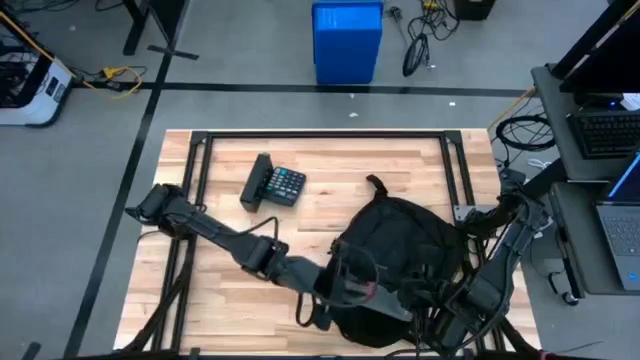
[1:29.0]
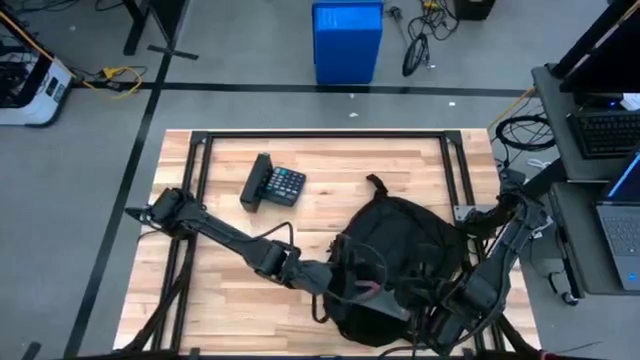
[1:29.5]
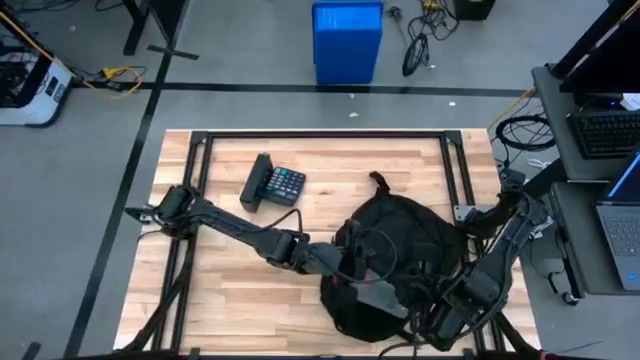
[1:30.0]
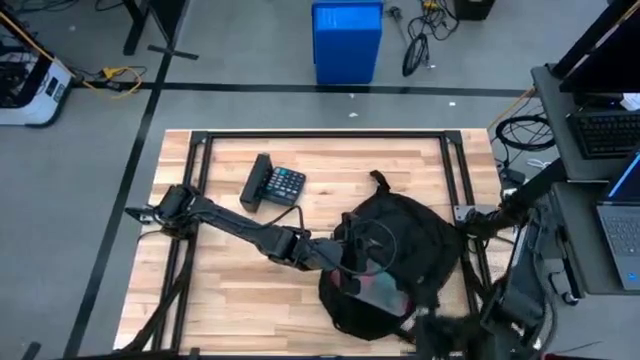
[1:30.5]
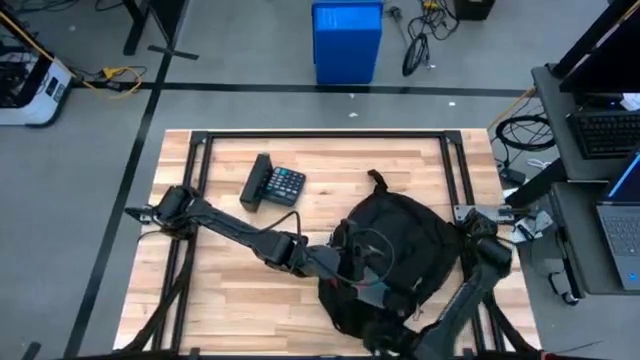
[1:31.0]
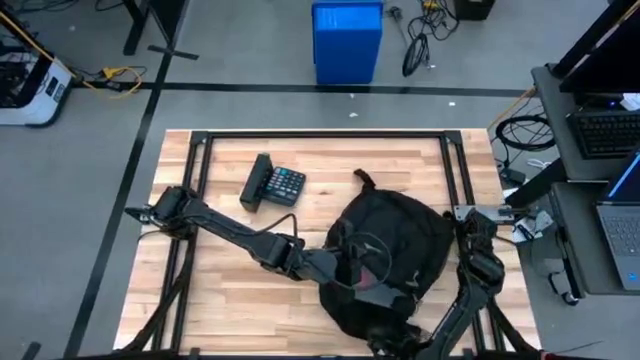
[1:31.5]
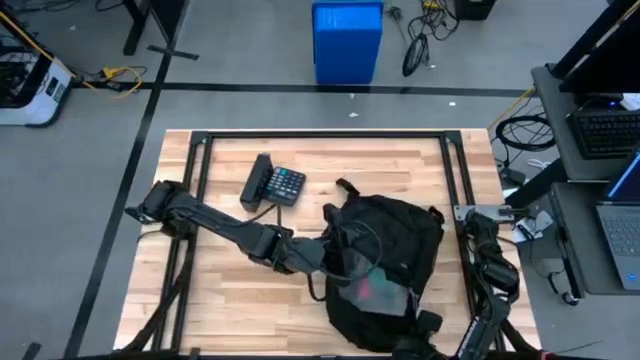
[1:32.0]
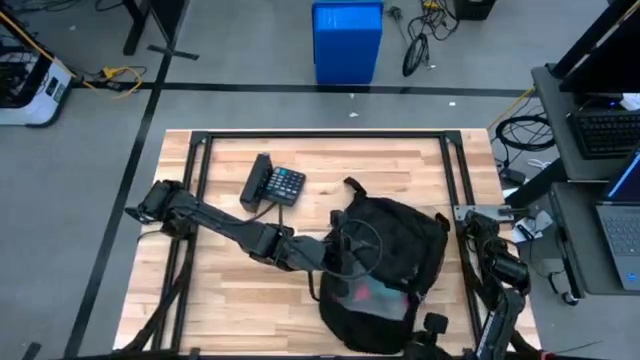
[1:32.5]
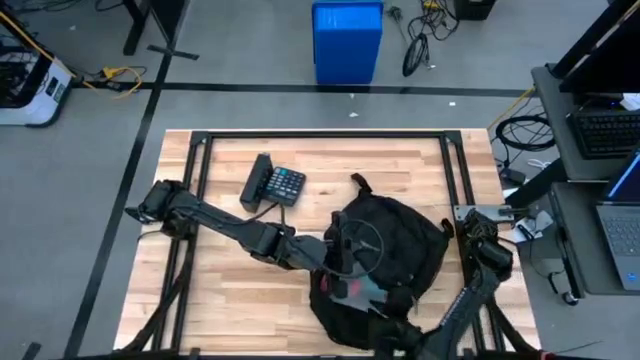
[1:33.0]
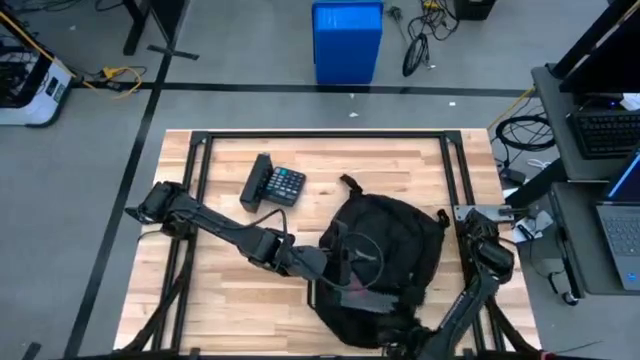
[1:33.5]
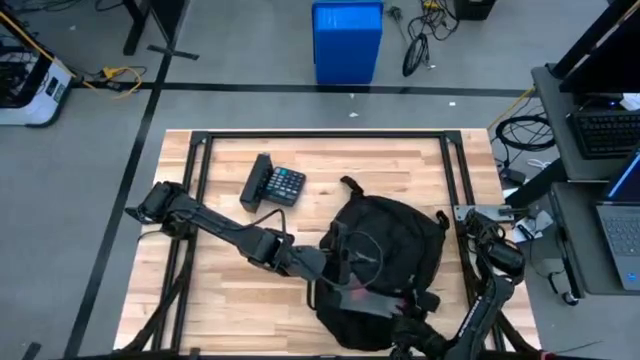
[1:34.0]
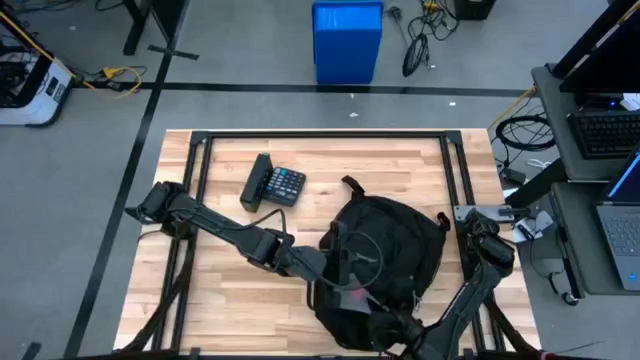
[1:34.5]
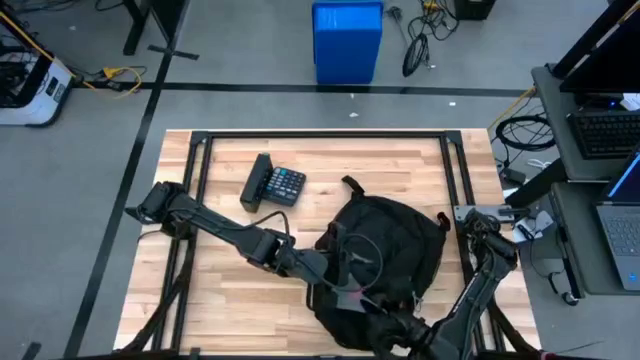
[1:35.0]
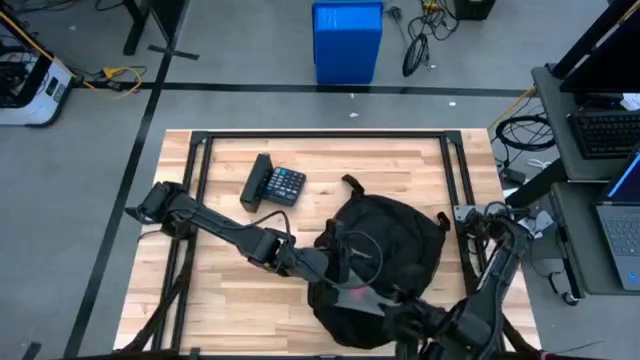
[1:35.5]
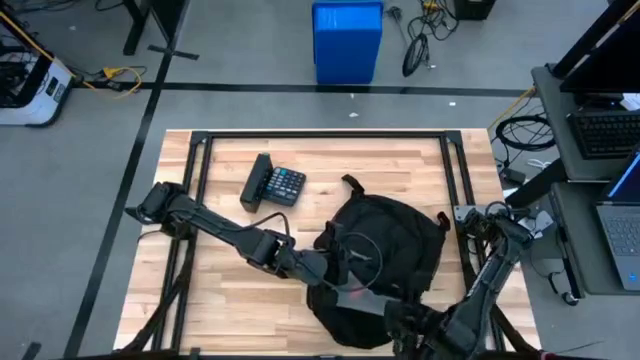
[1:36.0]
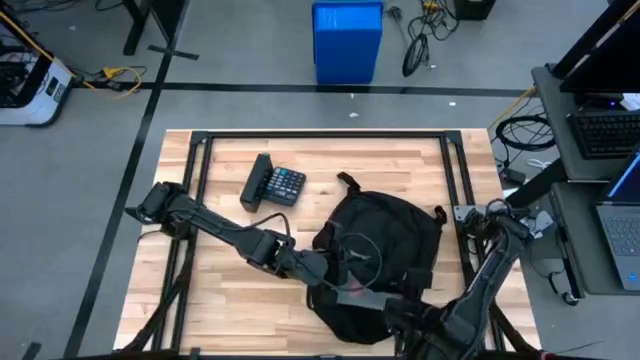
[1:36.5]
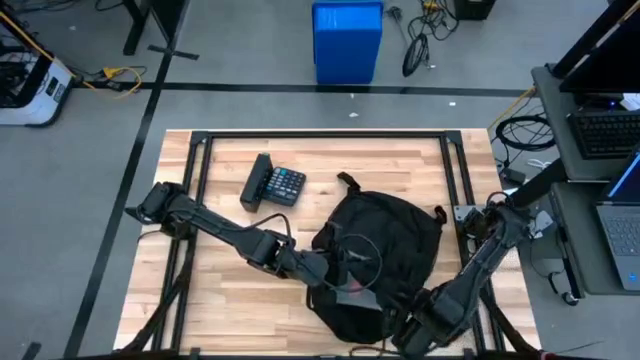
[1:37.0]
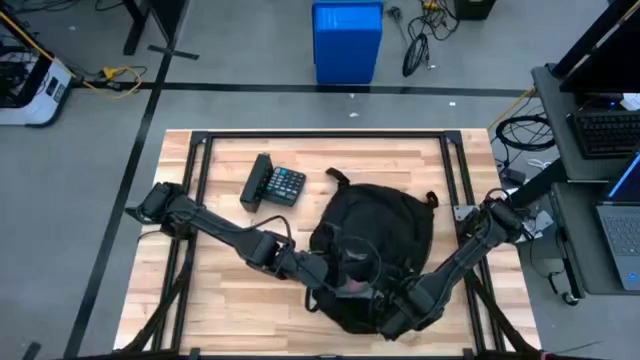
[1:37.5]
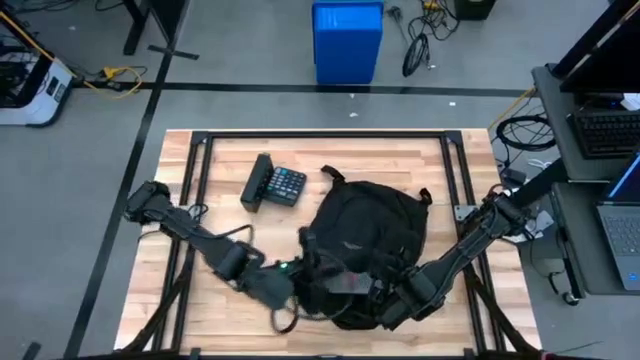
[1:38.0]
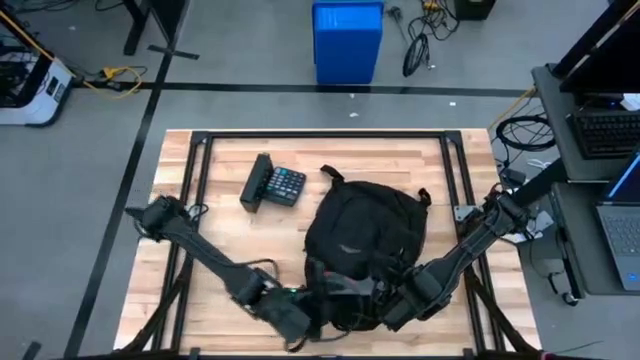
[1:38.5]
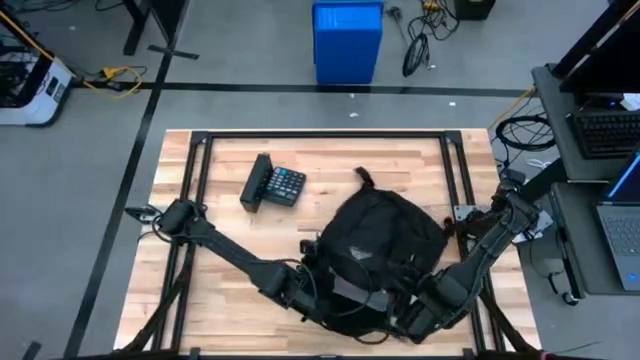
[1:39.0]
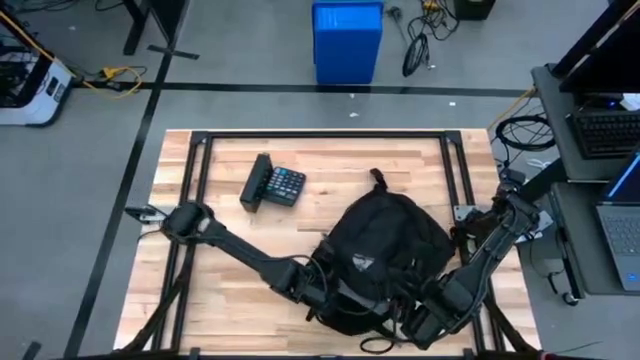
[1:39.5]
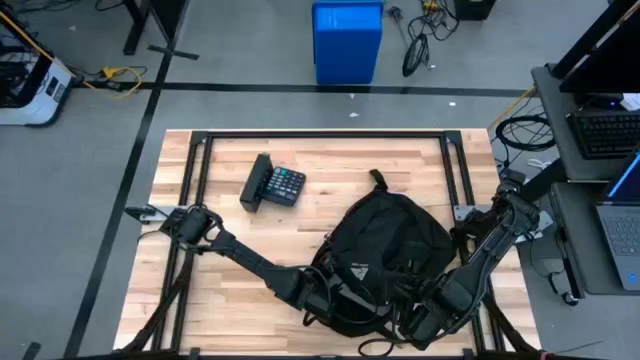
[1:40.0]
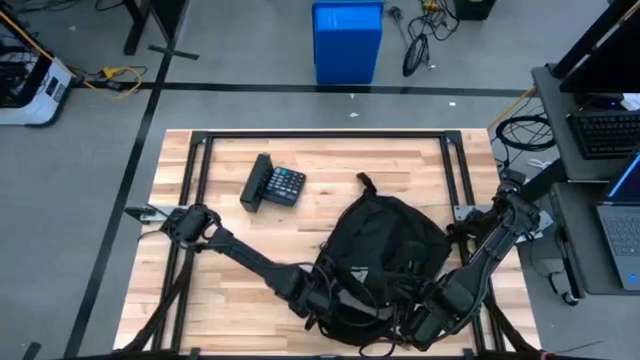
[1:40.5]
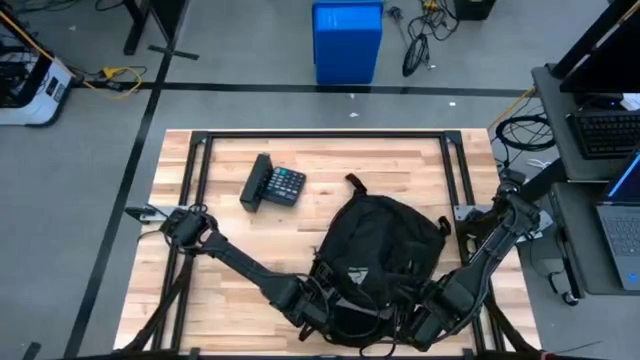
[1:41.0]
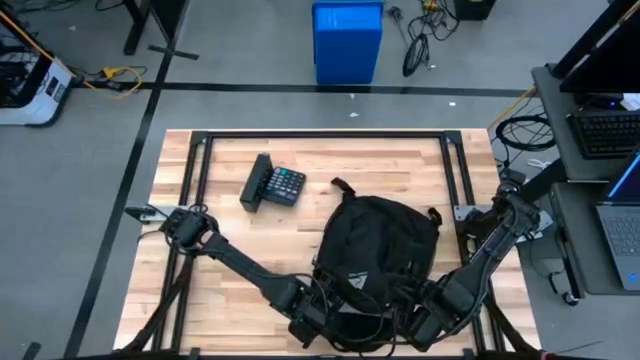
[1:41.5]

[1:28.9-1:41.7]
Task: Unpack backpack
Remove the white zip bag from the black backpack

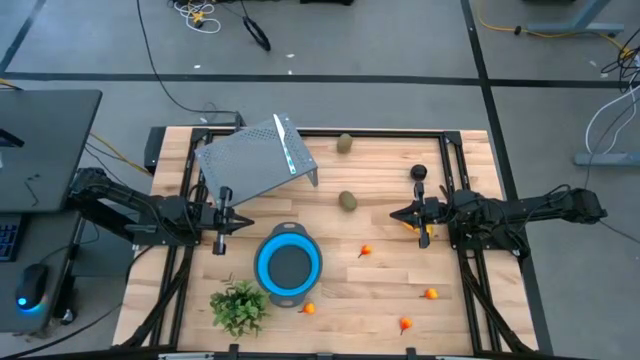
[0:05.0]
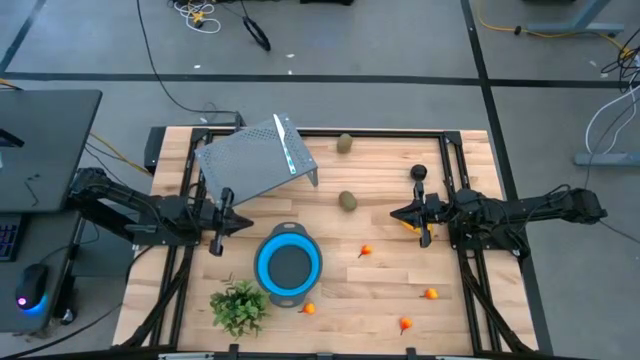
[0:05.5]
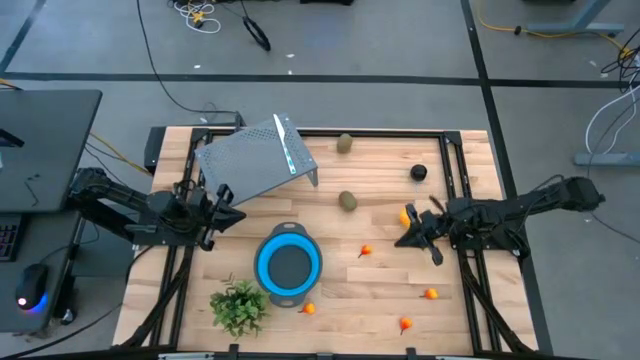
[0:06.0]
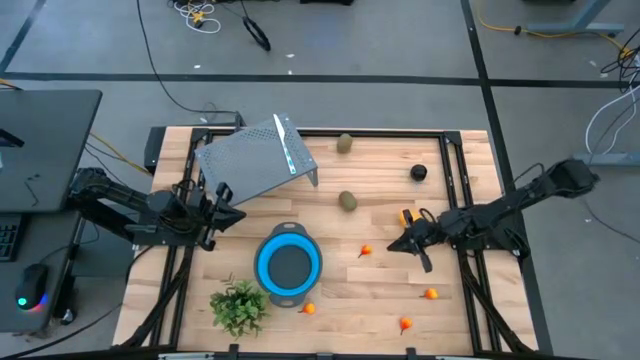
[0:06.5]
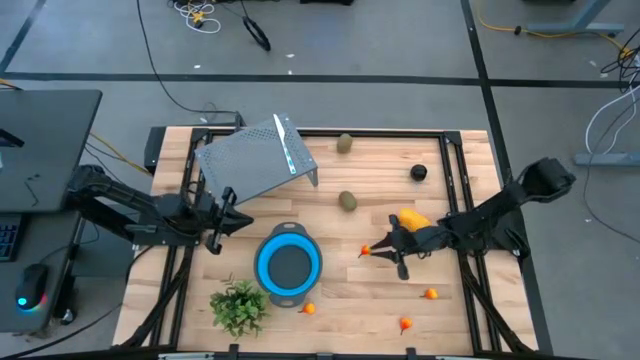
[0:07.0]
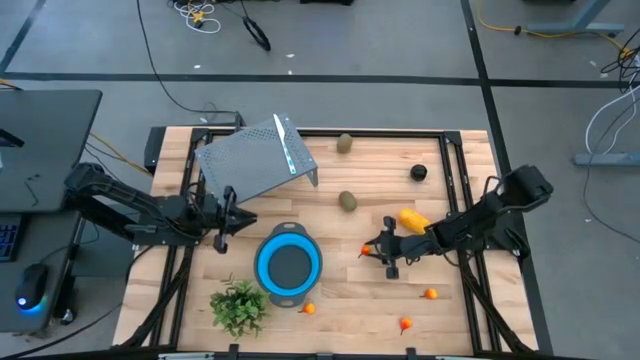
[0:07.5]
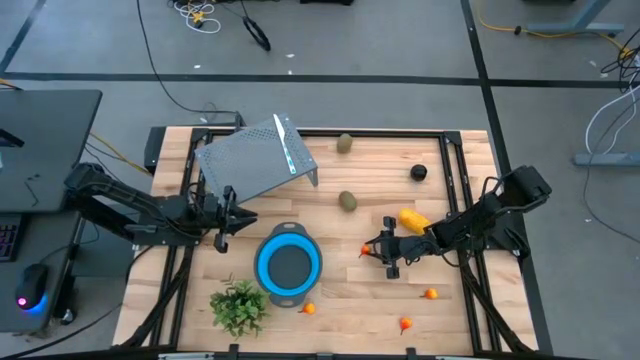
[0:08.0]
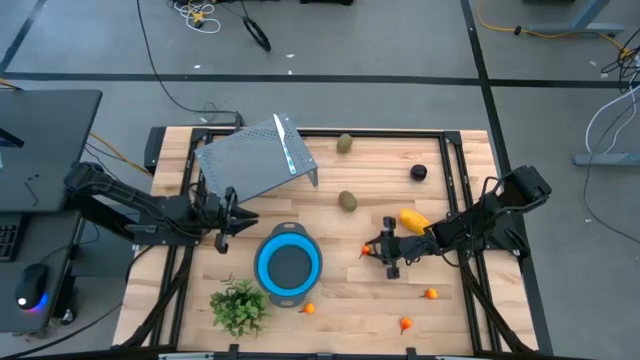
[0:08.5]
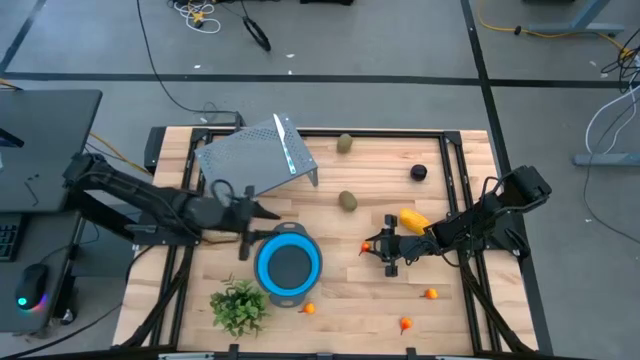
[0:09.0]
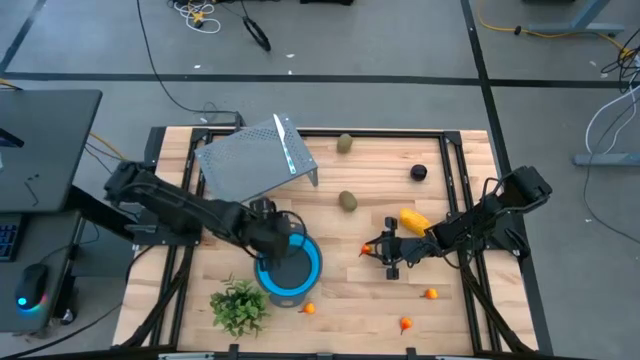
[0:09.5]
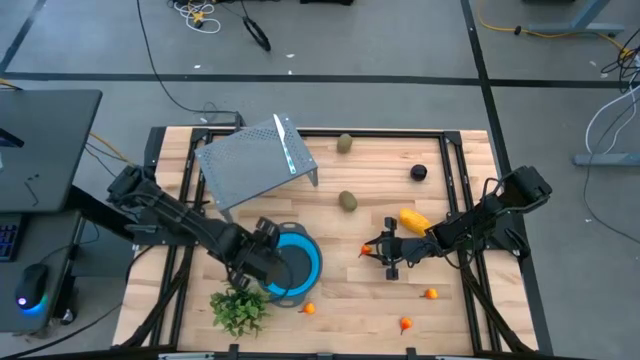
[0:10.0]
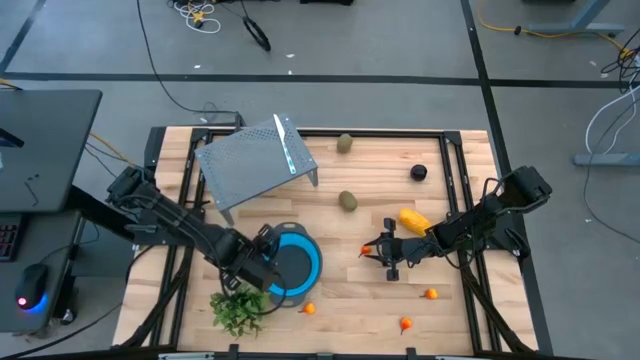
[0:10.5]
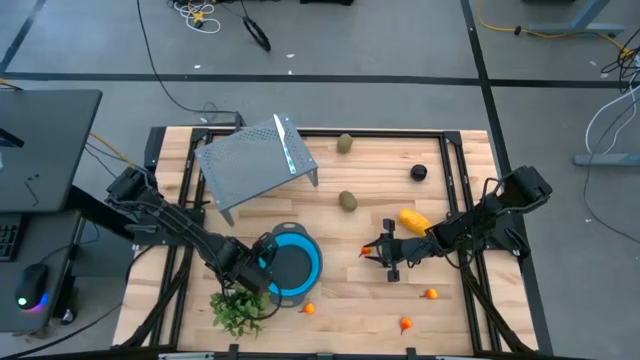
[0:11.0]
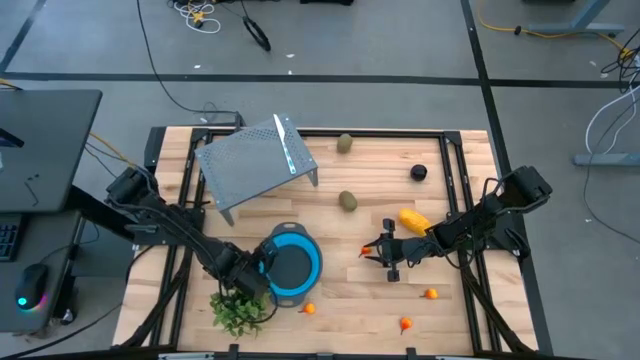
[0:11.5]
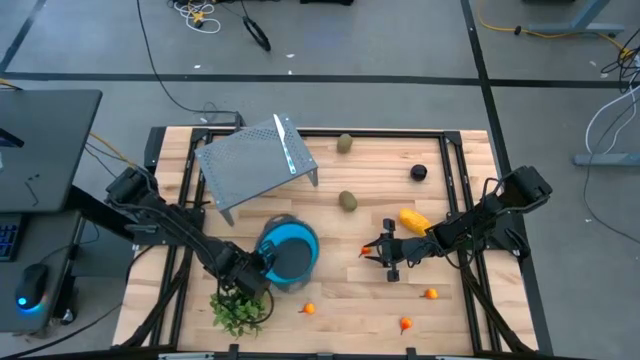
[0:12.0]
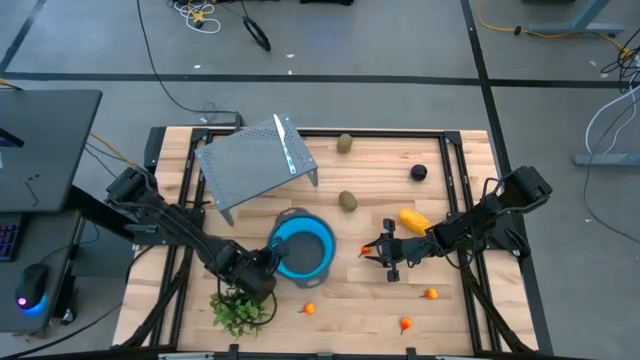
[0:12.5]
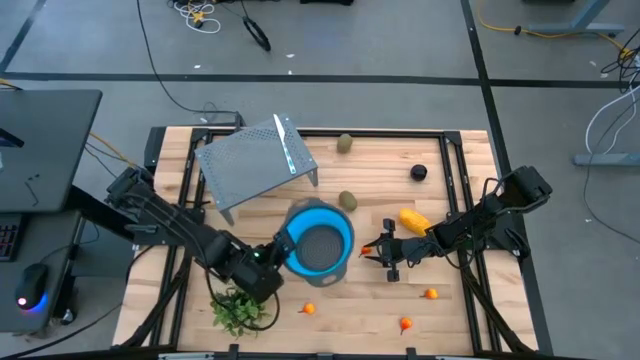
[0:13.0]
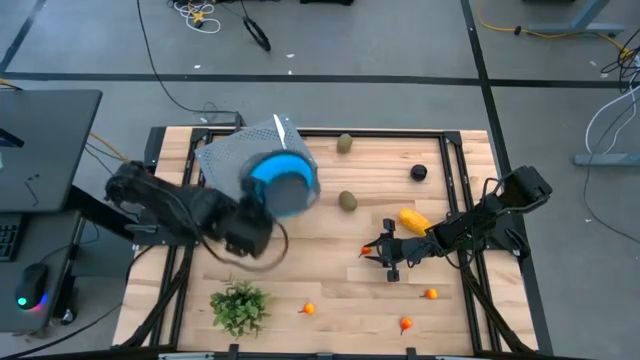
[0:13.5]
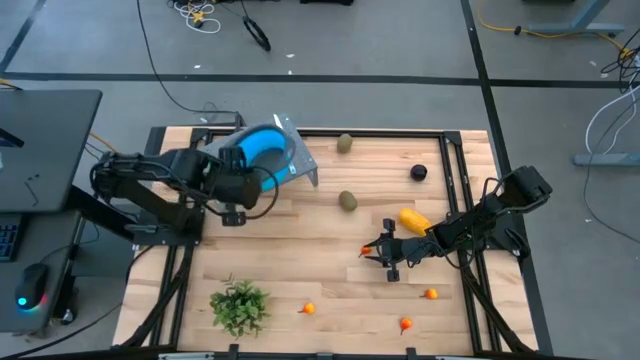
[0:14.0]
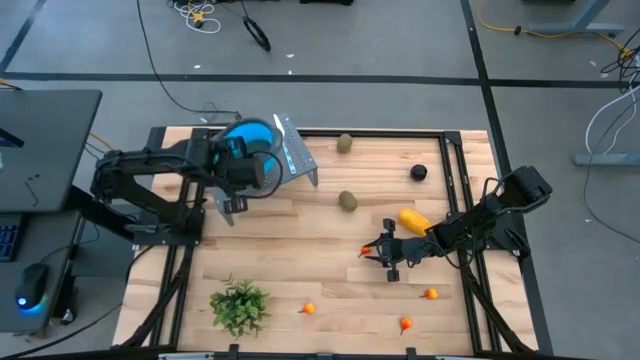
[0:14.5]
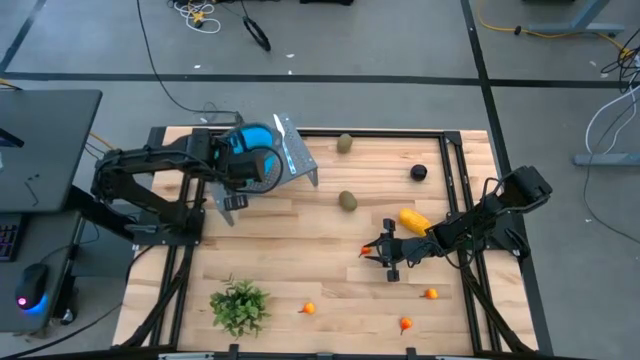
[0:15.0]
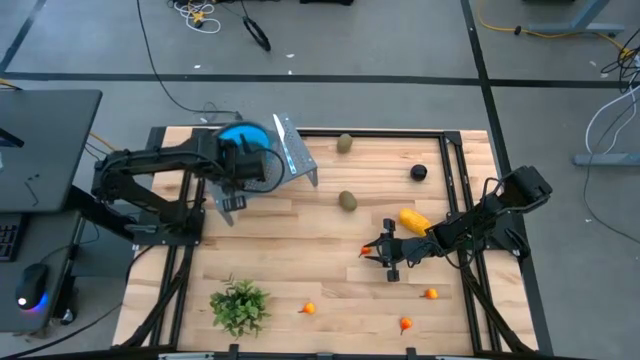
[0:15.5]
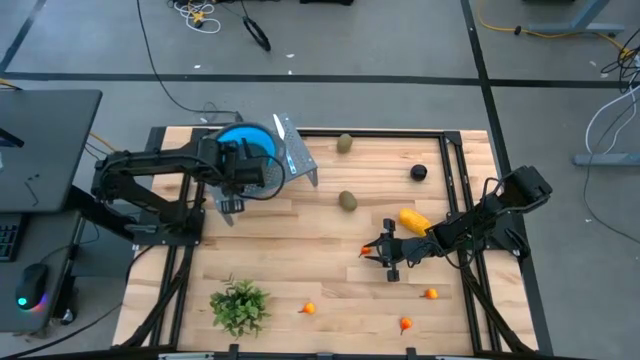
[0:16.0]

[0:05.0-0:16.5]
Task: Pick & Place Fruit
Put the blue strainer bowl on the shelf
